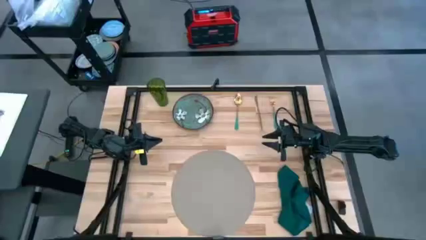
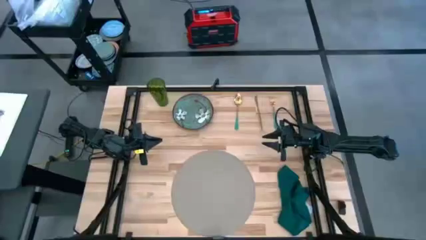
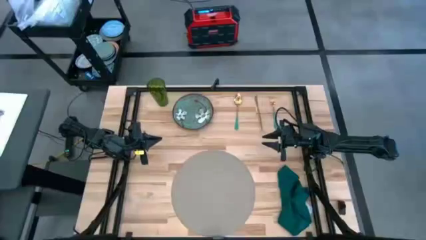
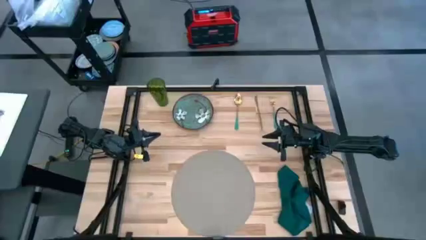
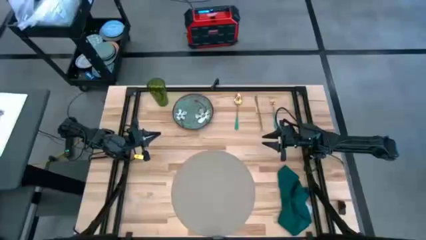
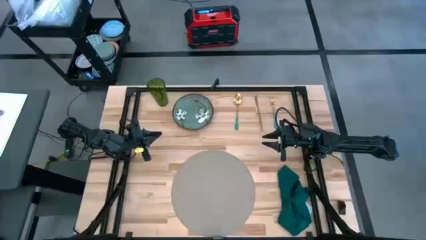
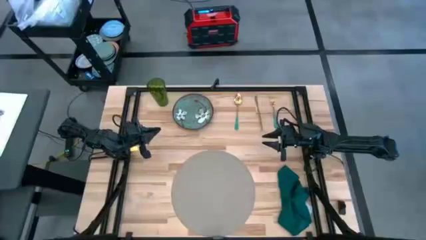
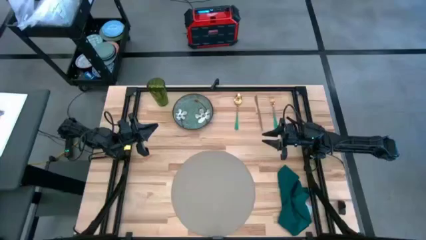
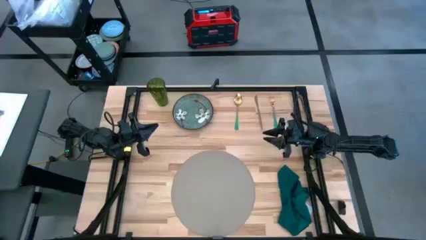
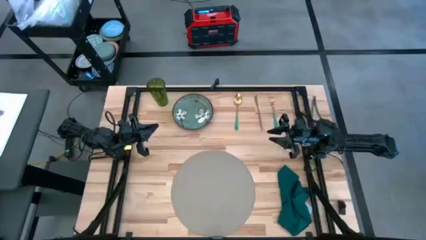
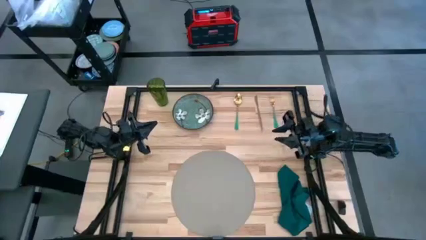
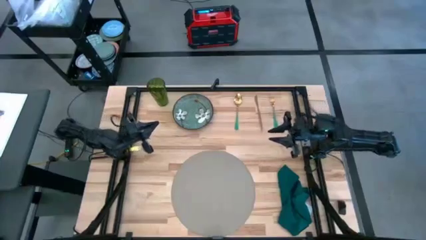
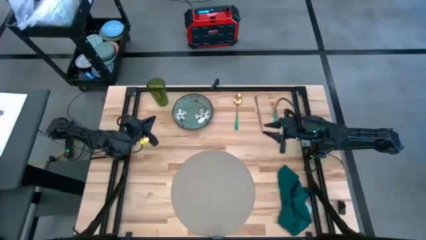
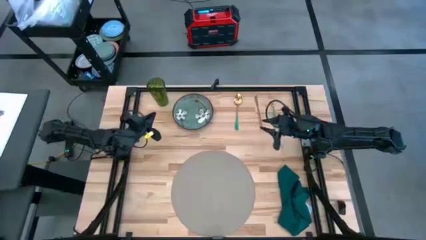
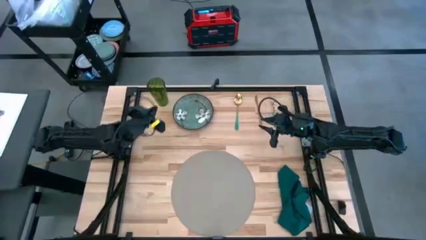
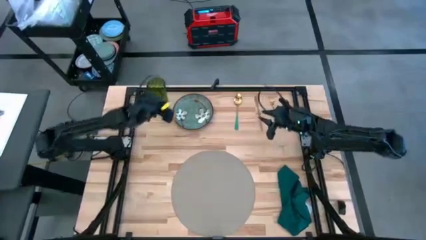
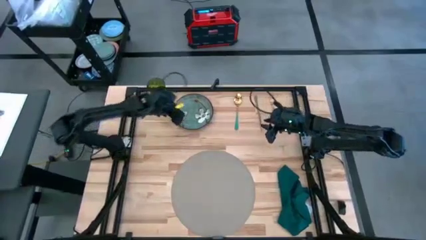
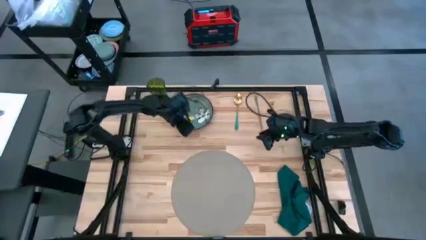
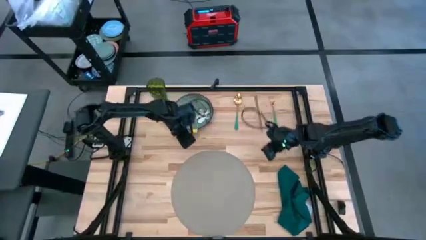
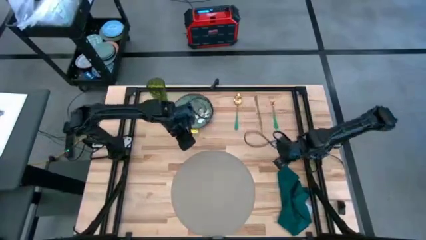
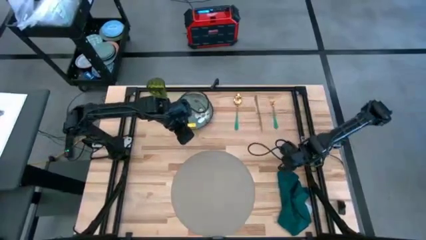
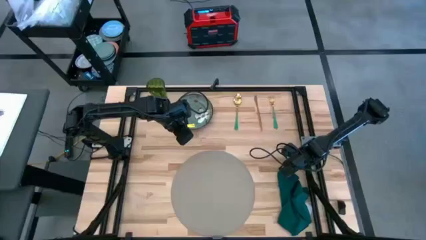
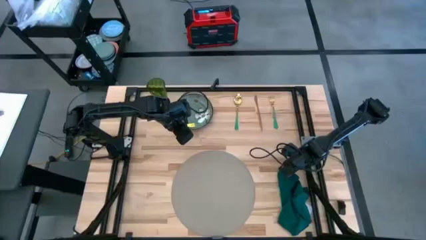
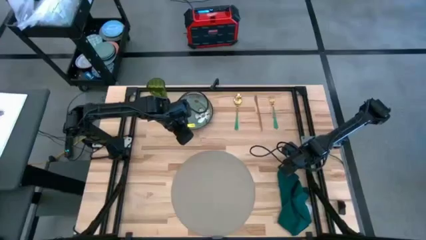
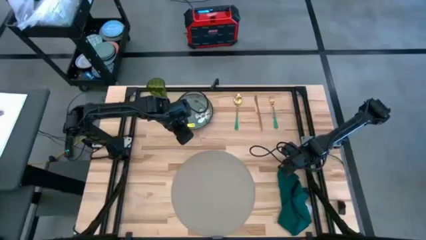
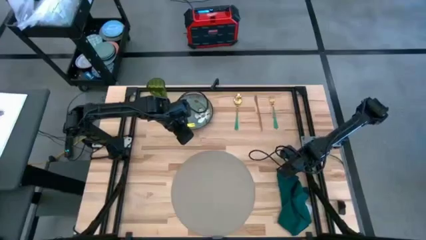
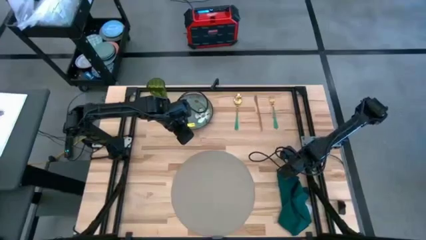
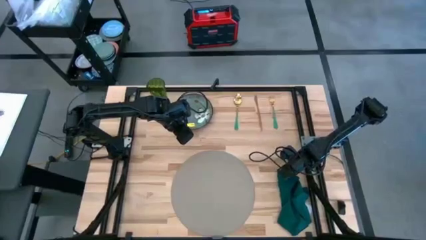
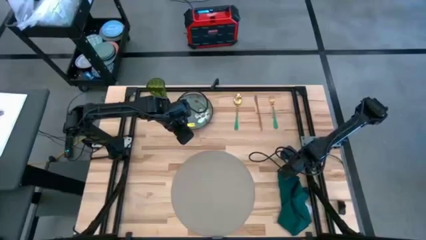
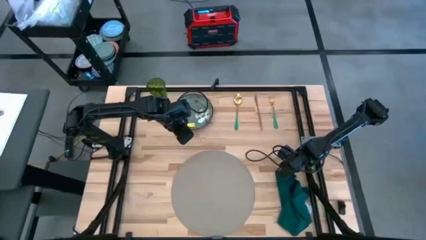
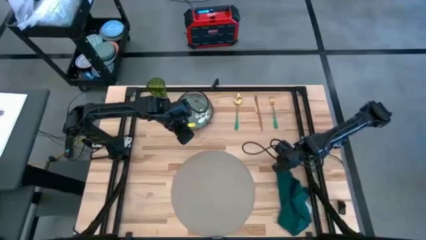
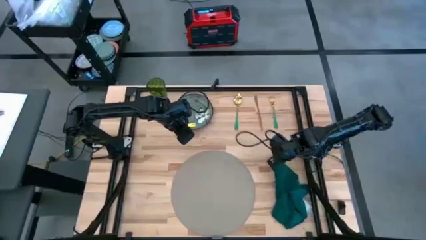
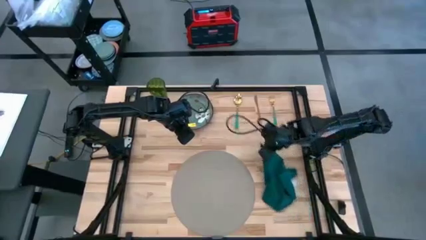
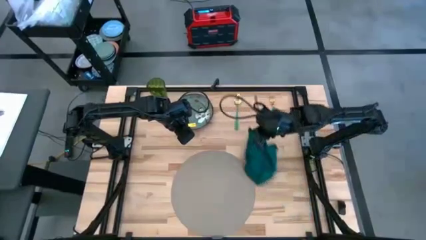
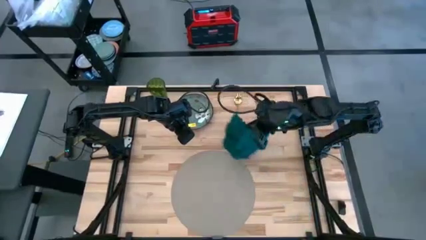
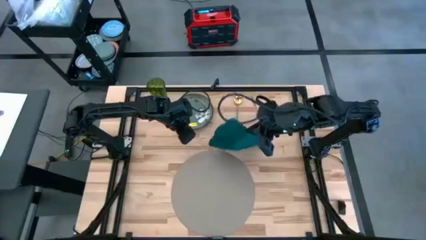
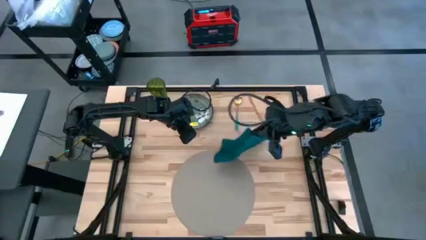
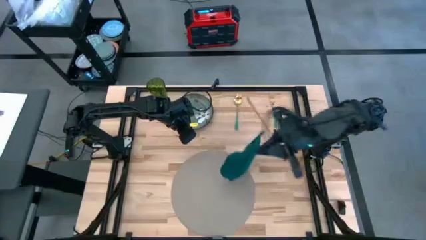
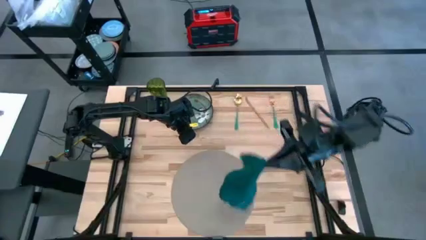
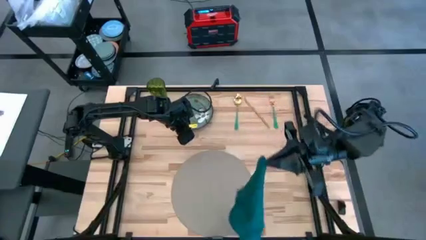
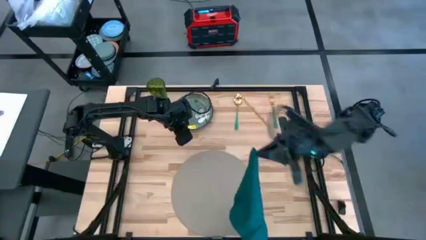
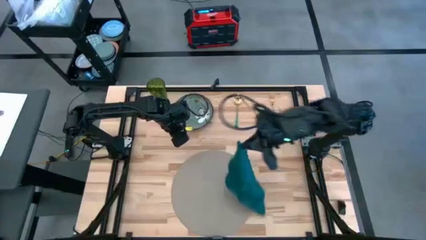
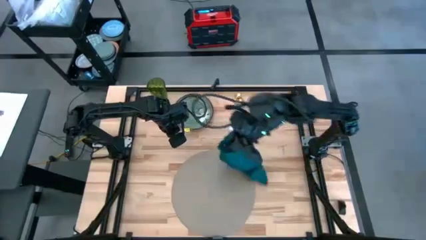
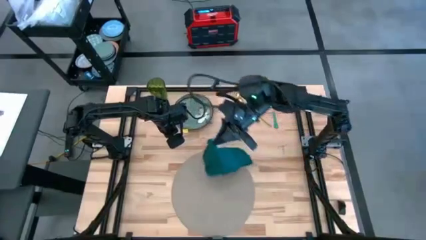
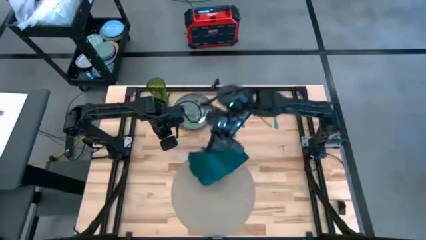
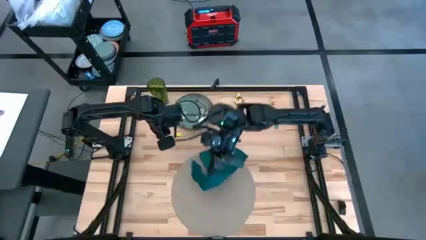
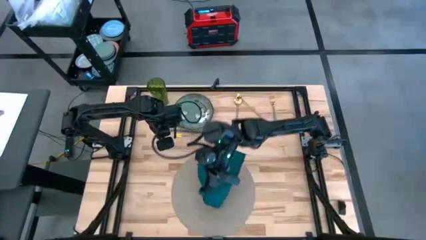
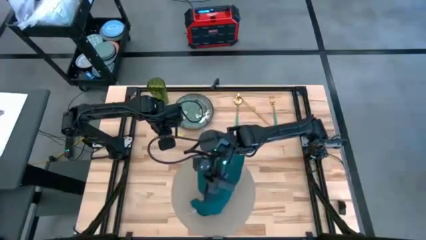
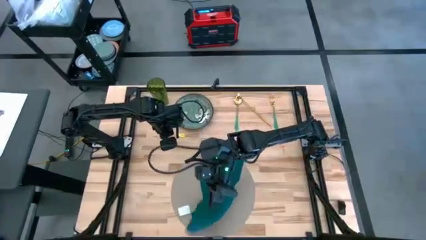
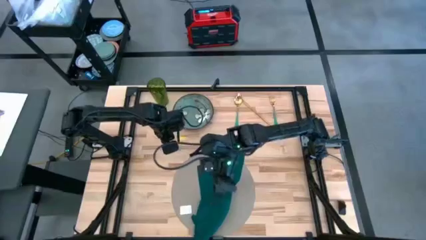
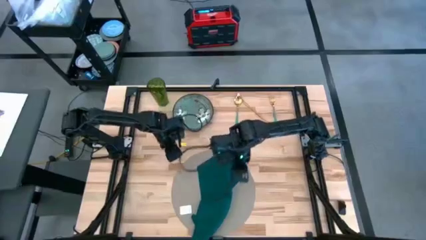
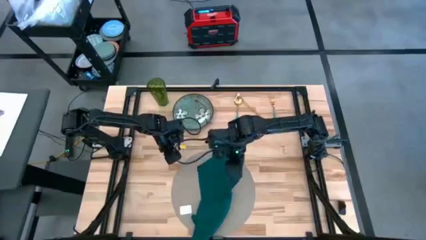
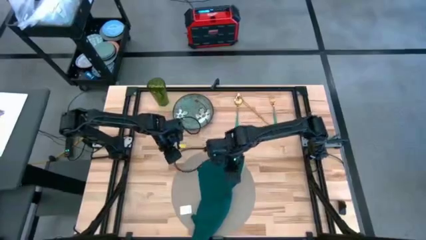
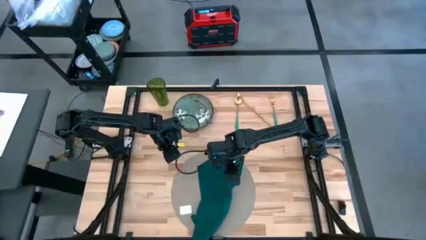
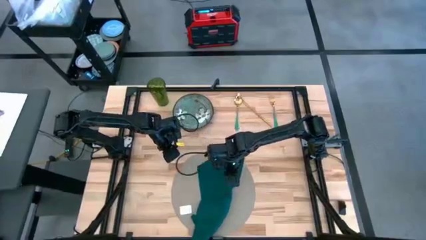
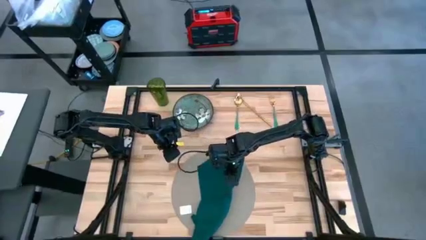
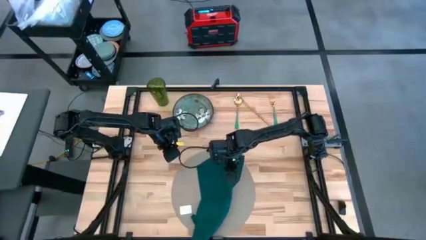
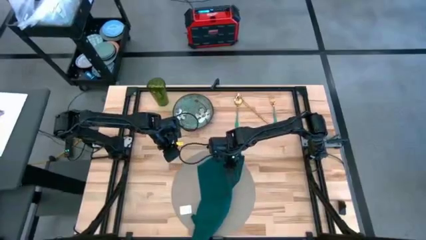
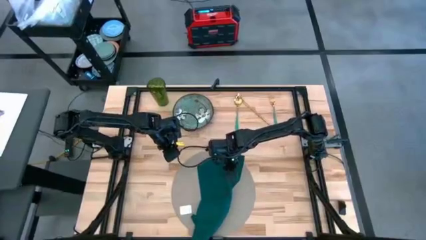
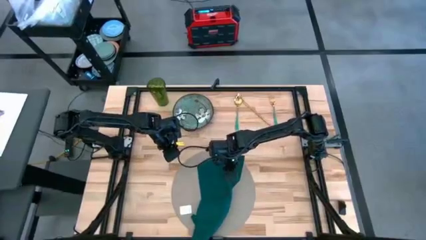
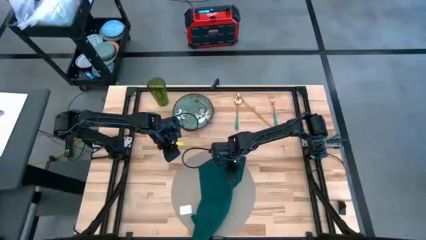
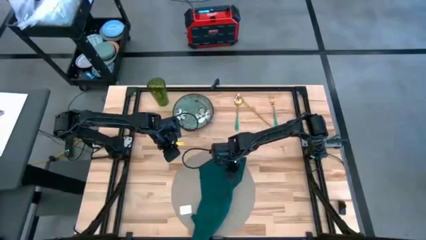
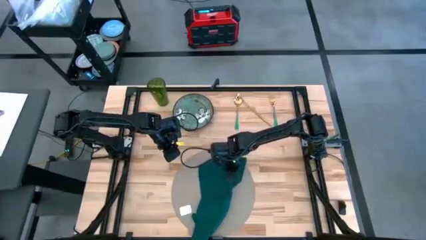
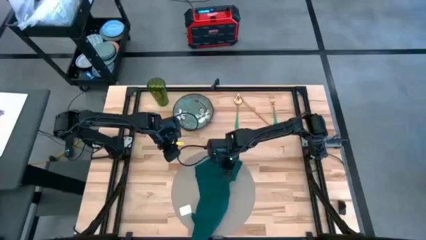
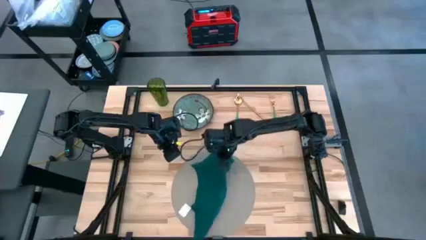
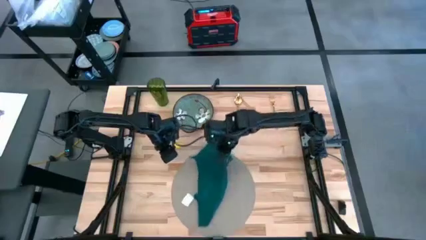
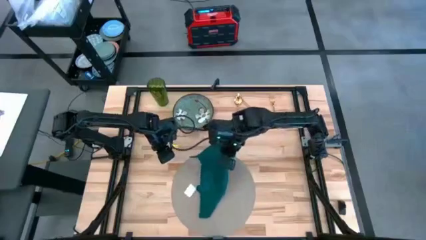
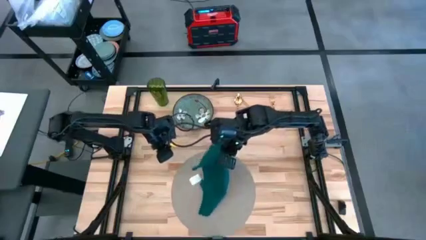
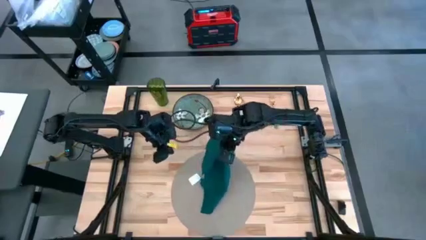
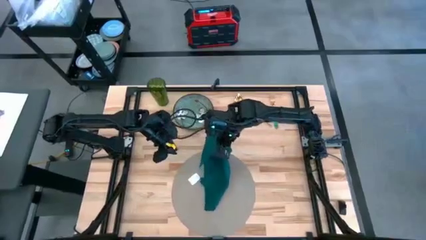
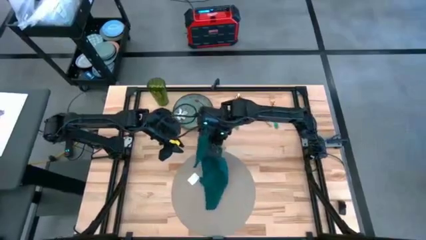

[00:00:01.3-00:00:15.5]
Task: Set table place
Fold the green napkin
